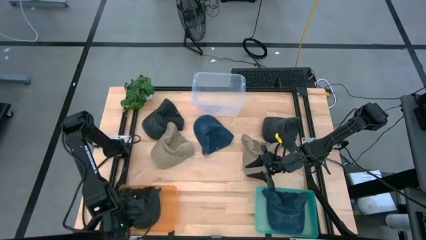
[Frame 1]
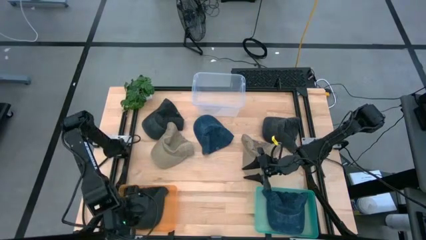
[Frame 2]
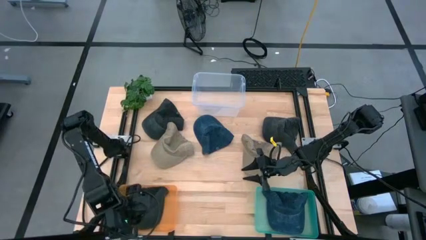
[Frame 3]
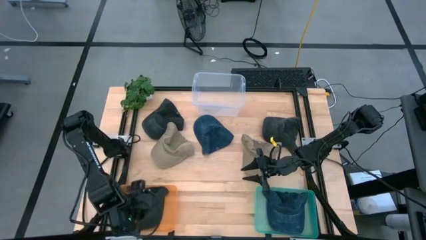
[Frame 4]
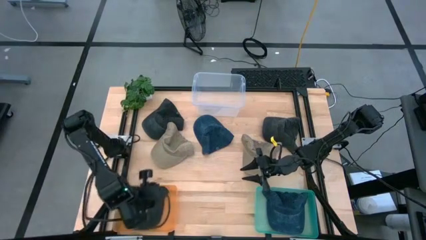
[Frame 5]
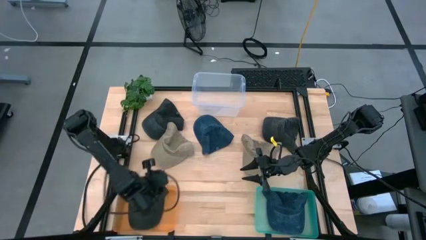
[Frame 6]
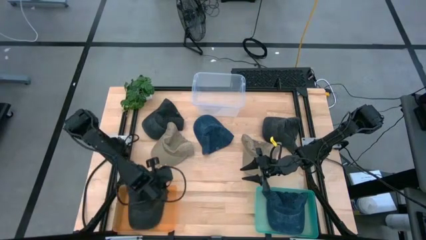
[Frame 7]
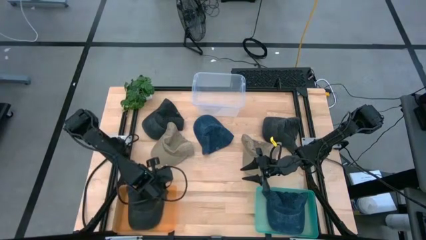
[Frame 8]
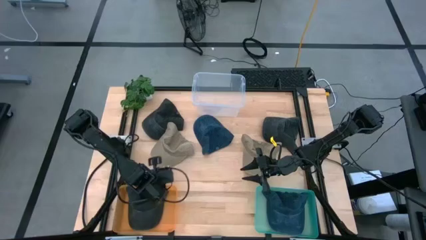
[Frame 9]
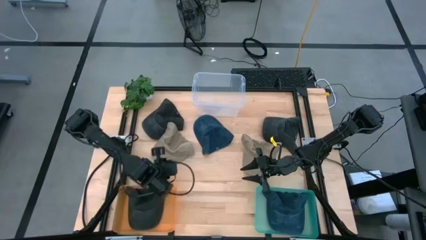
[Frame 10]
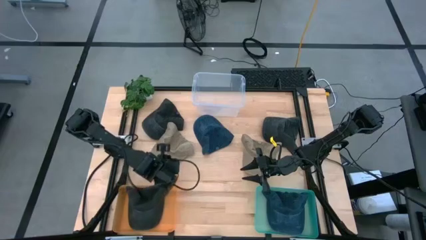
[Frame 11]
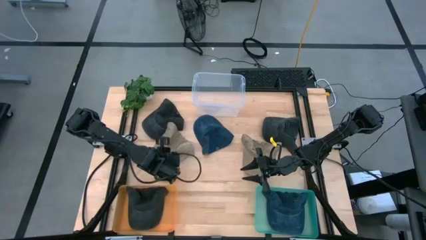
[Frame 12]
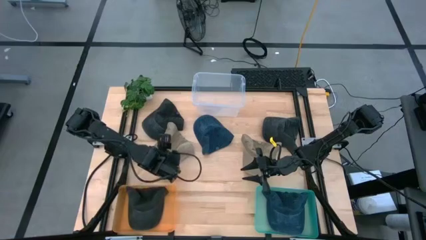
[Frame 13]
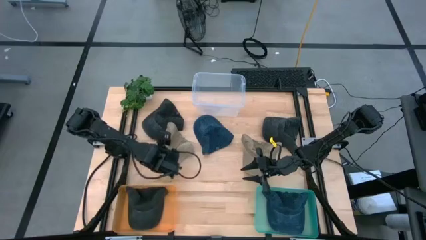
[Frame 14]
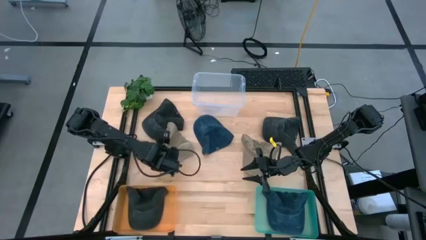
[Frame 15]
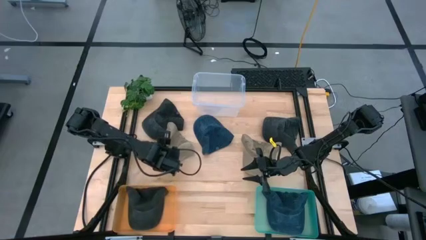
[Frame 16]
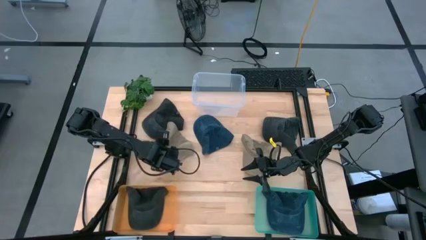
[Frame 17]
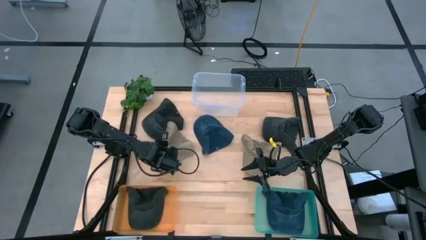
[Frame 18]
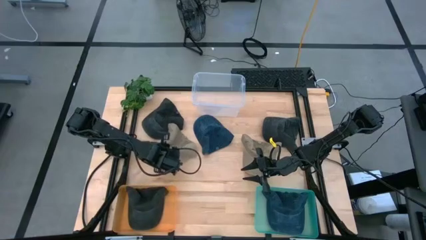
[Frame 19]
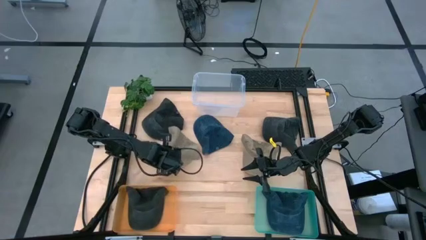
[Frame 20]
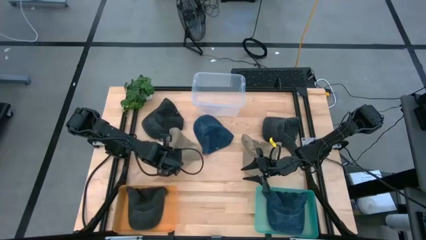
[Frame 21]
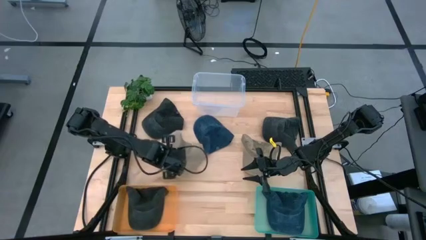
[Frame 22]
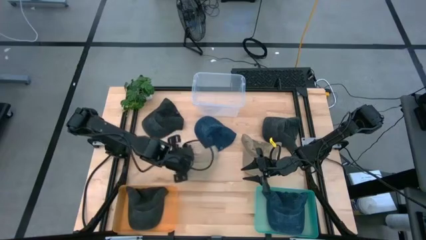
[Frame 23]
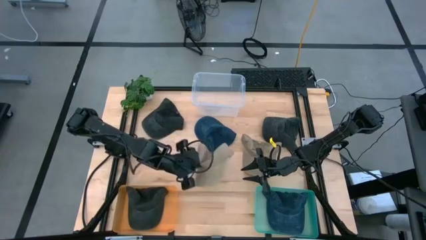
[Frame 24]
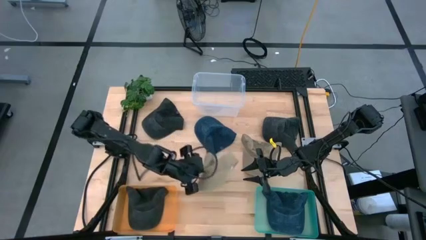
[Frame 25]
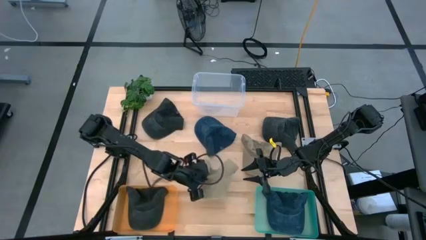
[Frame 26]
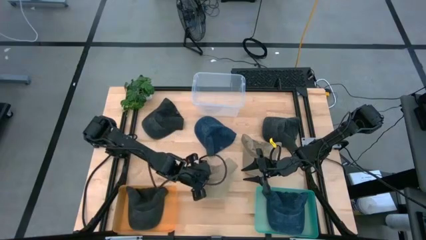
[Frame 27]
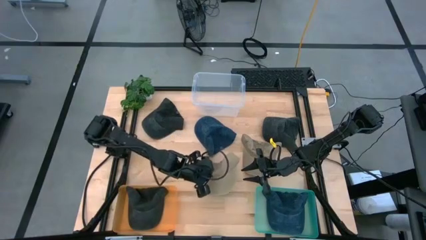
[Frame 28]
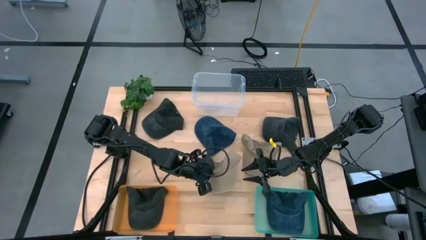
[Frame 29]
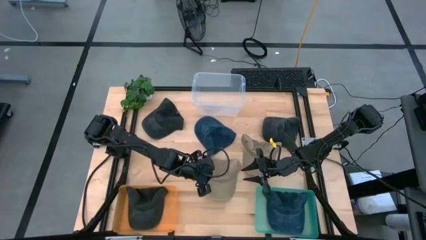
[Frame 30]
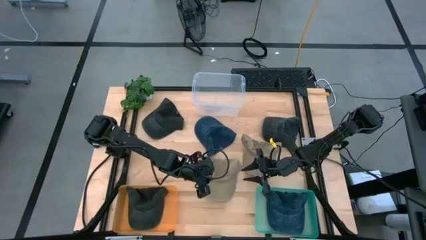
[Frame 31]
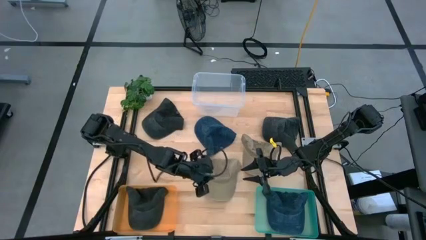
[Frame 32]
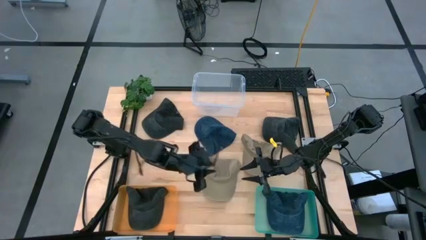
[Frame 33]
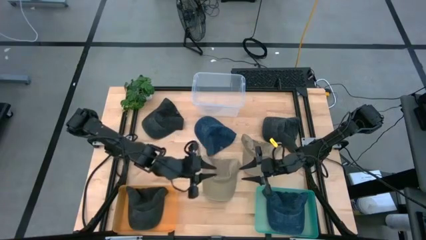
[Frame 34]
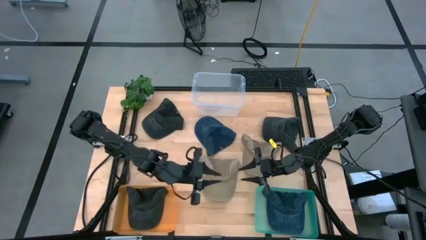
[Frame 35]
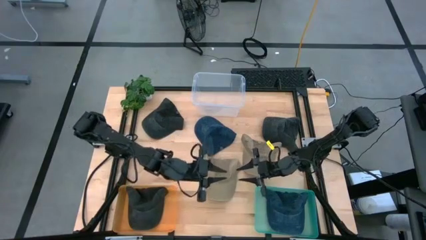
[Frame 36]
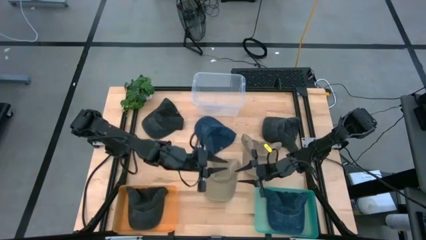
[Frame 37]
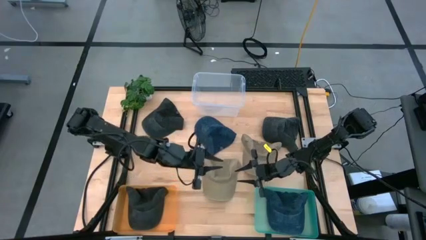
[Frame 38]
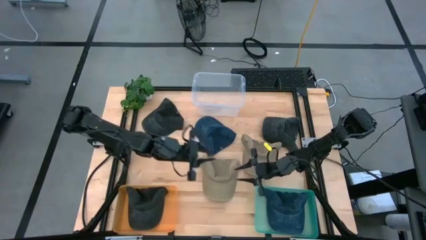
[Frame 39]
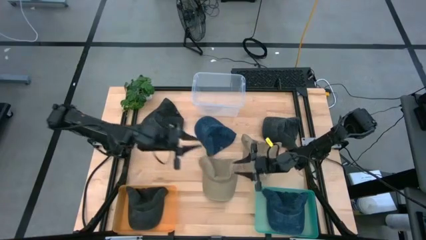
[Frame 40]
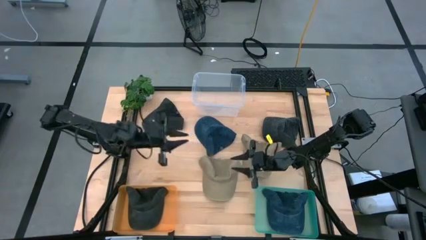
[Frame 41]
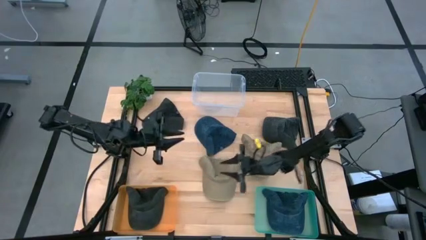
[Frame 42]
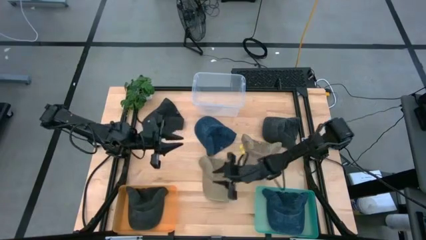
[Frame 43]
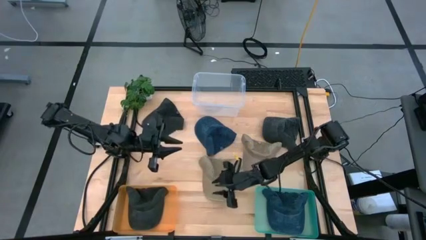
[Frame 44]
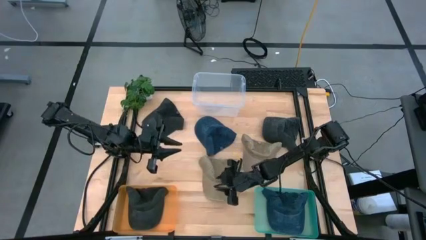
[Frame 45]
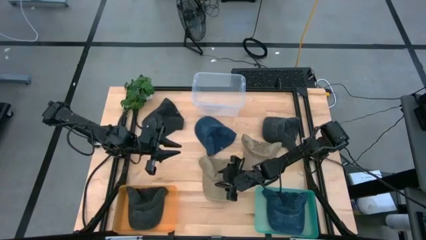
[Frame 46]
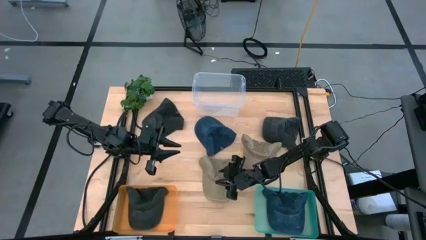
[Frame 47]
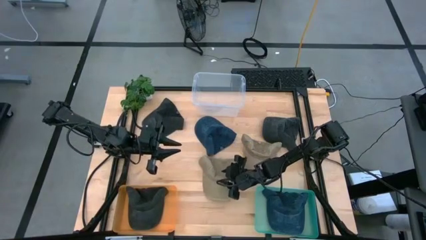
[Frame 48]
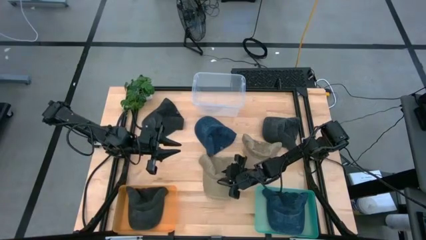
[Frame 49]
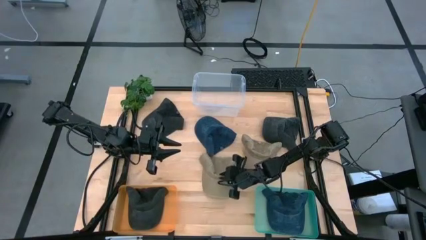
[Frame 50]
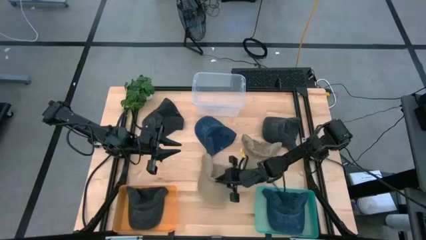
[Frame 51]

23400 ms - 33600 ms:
Task: Pick & Place hat
Put the left brown cap into the transparent bin

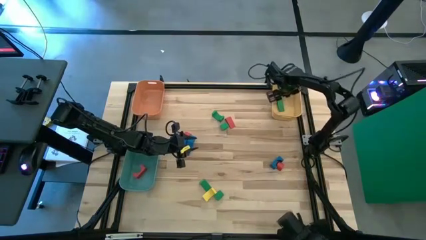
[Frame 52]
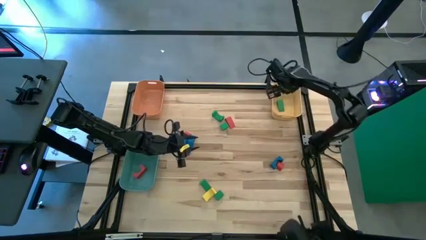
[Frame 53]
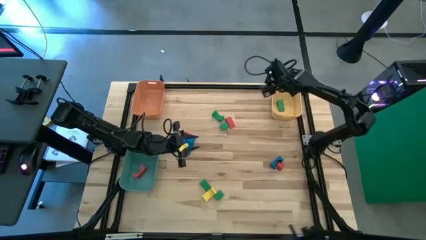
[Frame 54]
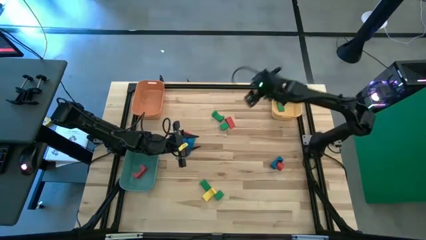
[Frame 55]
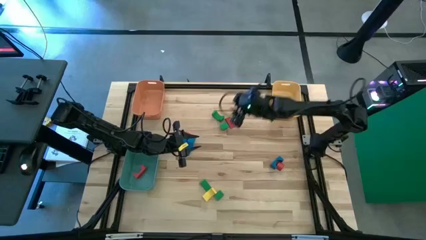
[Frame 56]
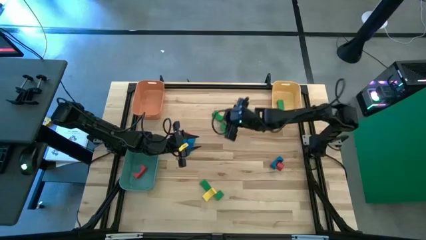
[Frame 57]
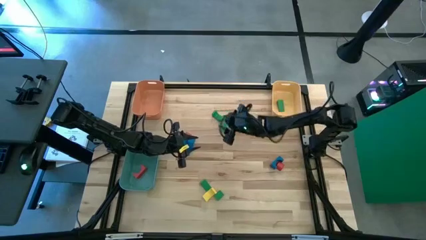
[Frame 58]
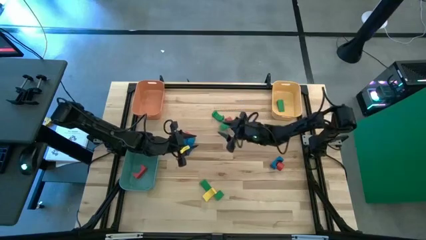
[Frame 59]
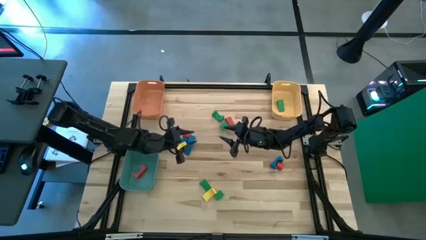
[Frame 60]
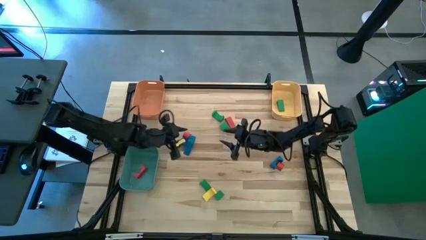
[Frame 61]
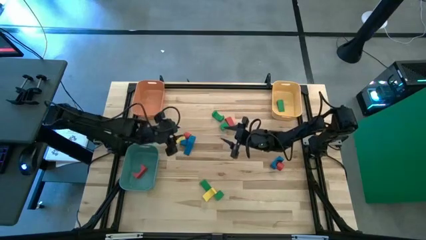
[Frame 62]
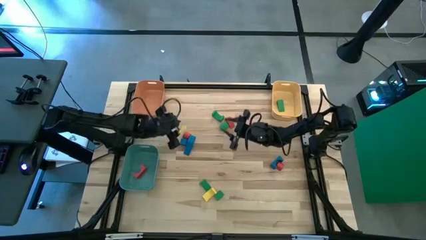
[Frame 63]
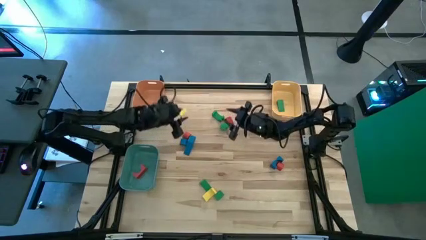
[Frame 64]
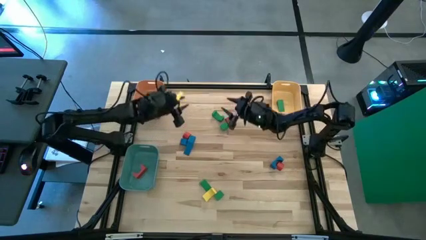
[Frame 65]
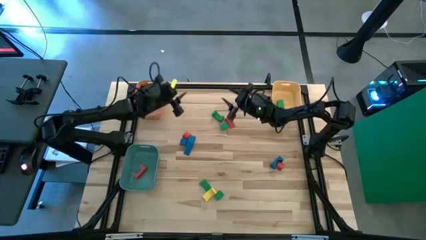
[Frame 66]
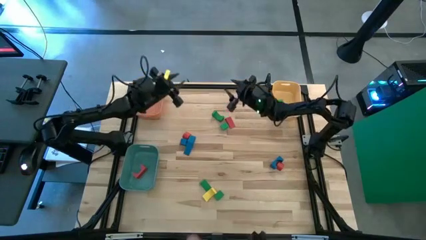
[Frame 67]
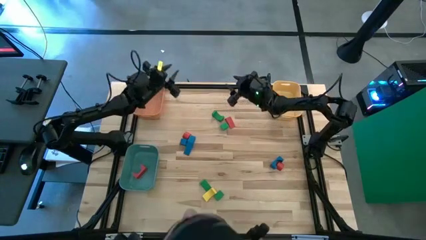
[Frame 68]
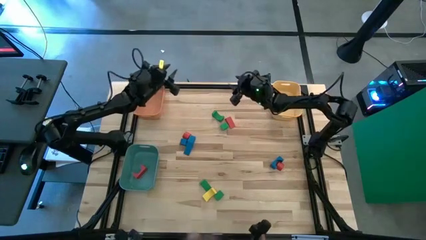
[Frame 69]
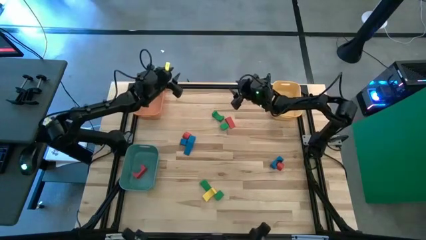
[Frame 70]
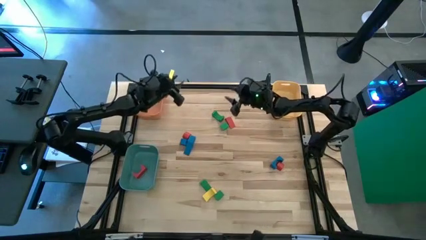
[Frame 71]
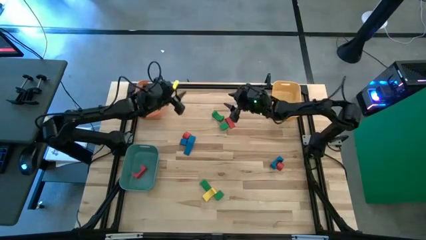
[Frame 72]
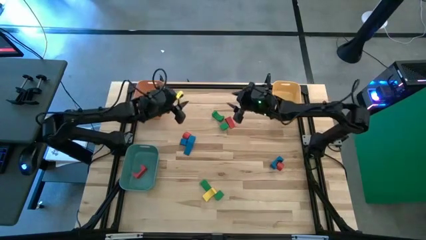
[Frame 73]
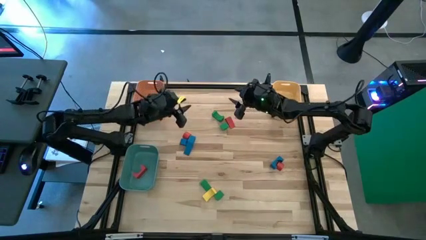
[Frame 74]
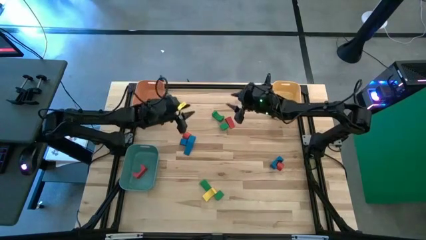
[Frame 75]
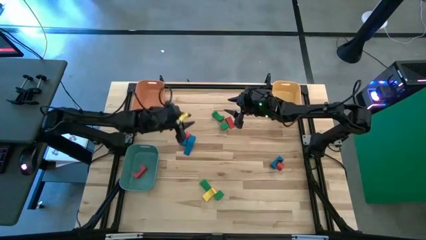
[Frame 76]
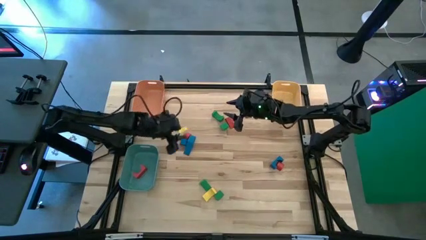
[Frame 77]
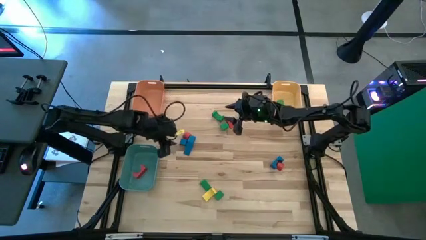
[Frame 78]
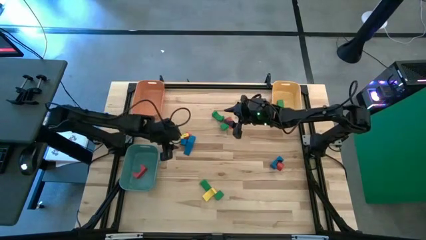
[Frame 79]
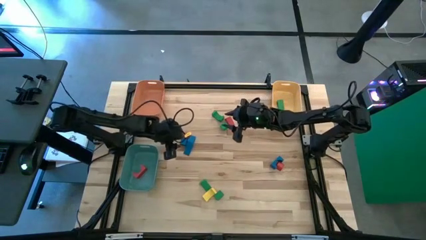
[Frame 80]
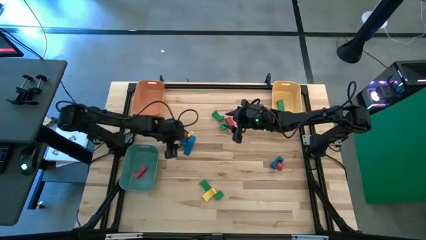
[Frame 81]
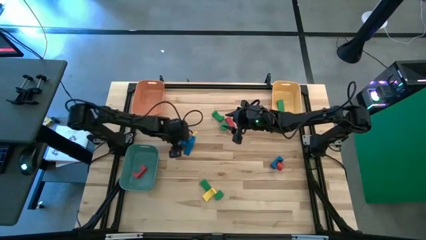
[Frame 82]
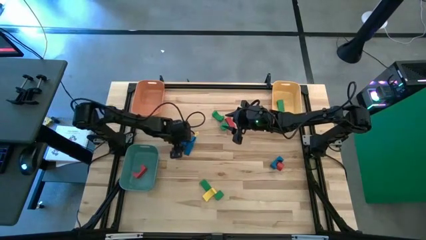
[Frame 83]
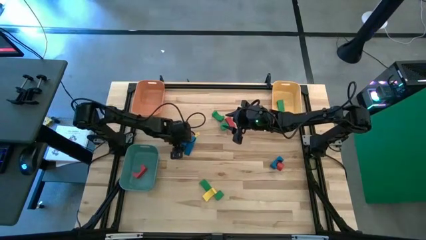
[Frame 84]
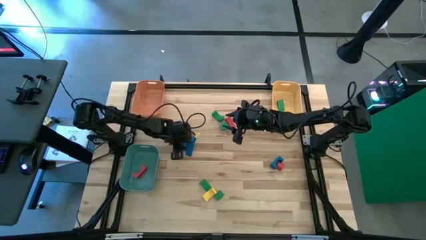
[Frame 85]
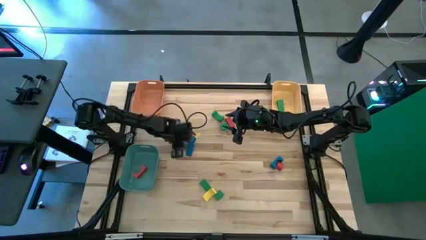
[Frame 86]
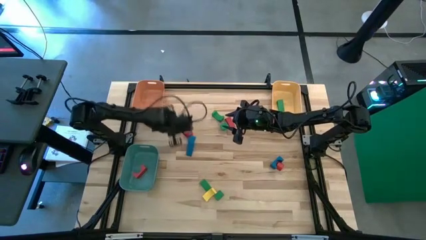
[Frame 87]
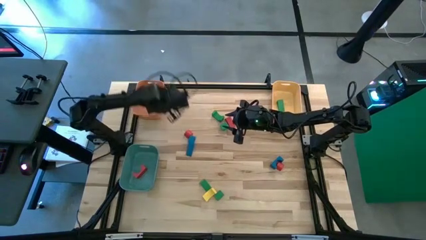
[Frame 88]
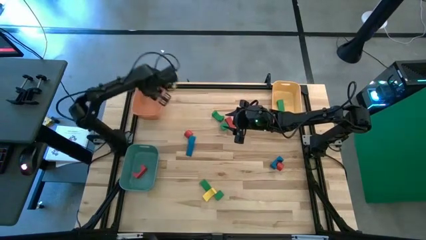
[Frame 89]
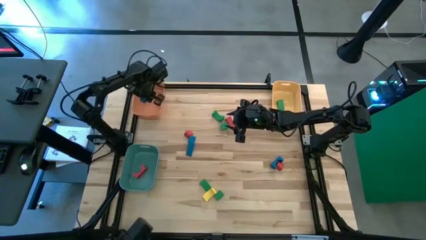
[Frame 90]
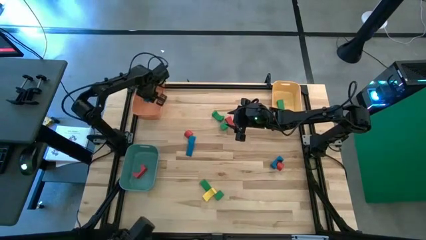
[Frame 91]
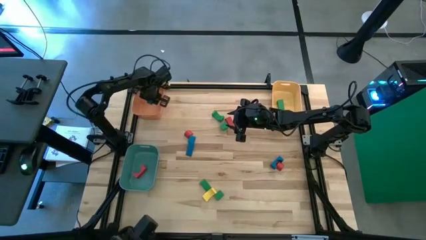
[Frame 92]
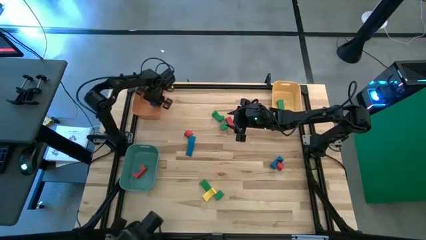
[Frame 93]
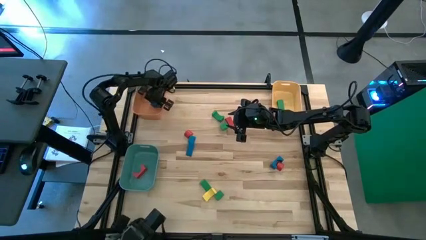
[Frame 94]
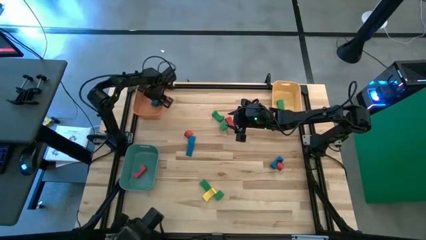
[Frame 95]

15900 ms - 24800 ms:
Task: Sort blocks by size
Put the blue half circle block into the orange bin
